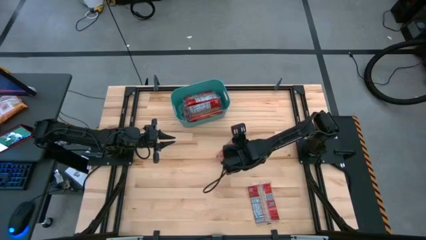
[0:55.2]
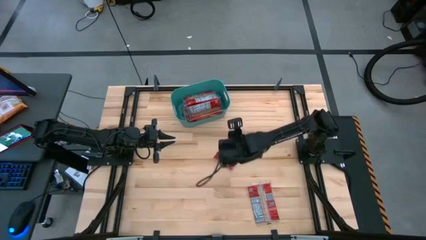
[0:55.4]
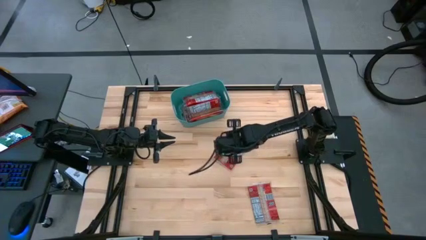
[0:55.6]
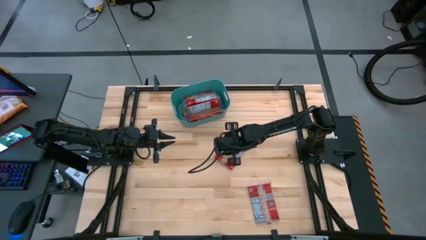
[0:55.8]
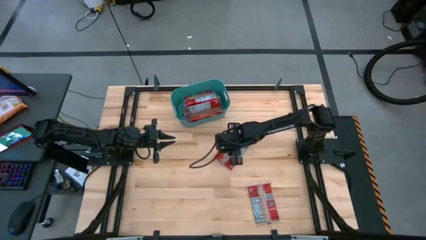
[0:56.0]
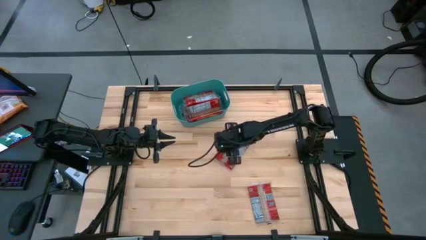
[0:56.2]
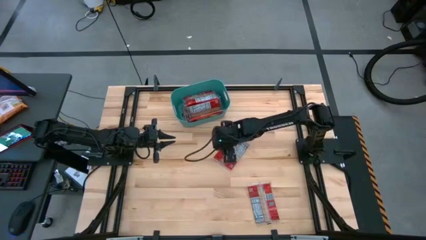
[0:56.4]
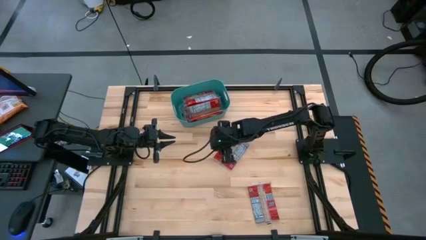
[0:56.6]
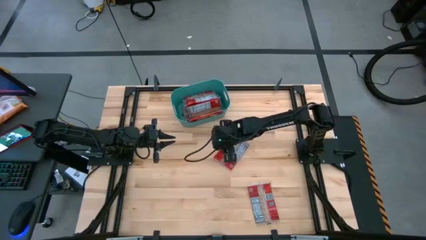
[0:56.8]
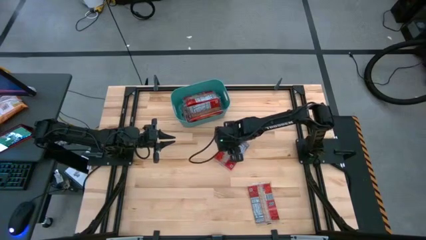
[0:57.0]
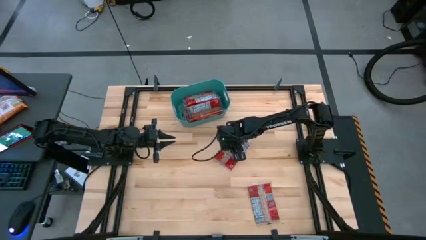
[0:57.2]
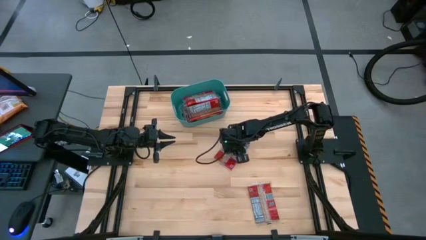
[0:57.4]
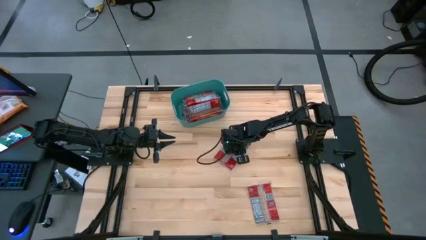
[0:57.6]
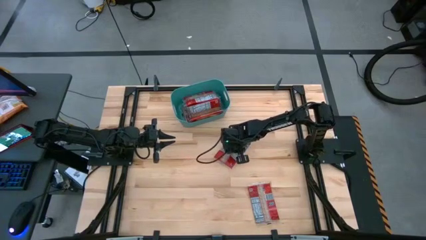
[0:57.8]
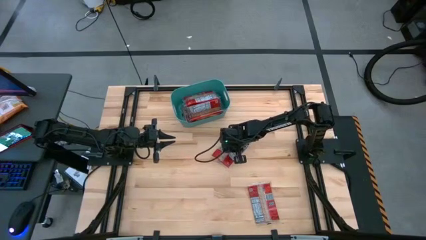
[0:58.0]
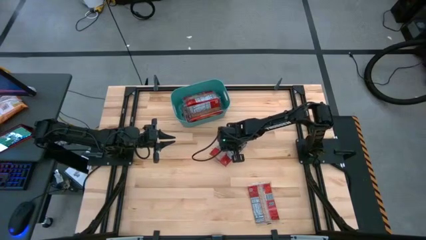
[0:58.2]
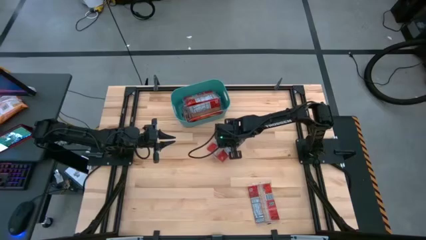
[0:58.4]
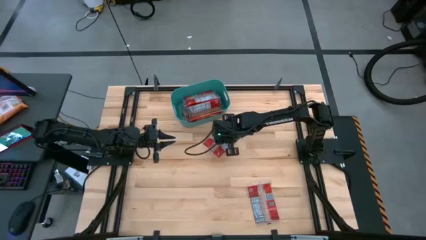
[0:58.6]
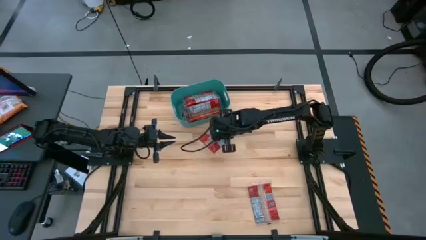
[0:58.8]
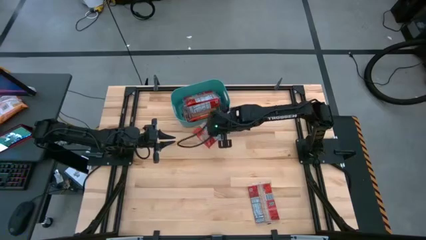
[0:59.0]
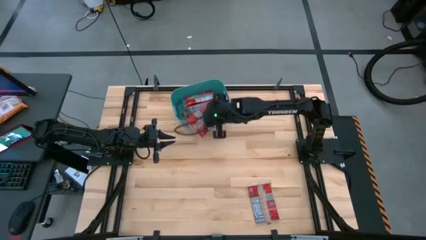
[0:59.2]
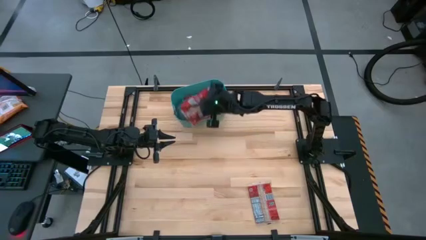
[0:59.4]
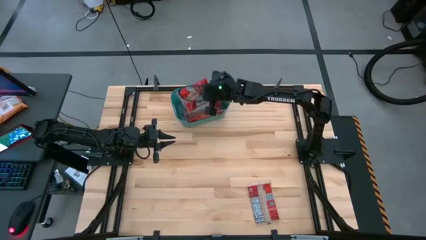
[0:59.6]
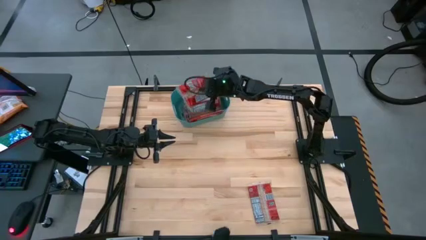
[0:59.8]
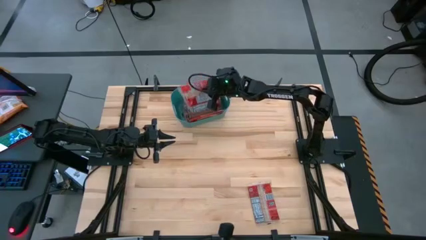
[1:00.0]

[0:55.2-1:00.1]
Task: Sort popcorn bags into baskets
Put the red popcorn bag into the green bin

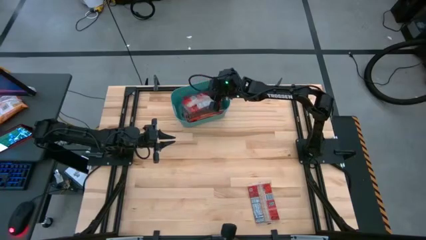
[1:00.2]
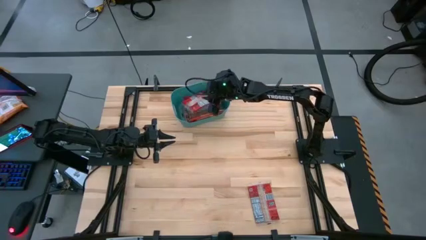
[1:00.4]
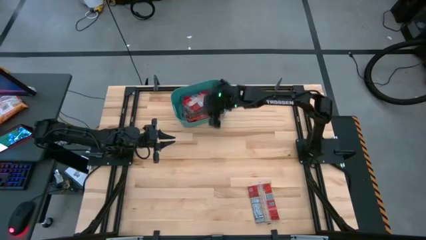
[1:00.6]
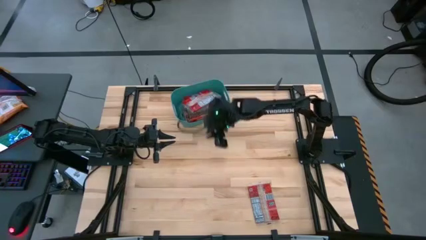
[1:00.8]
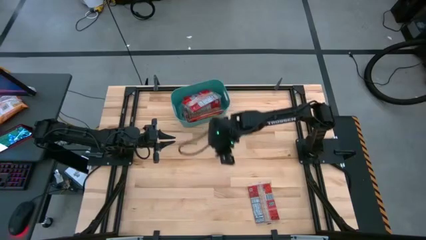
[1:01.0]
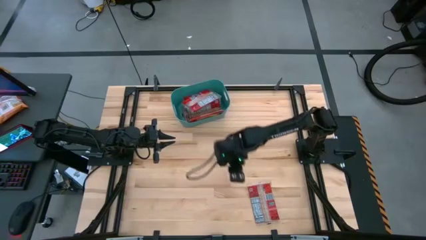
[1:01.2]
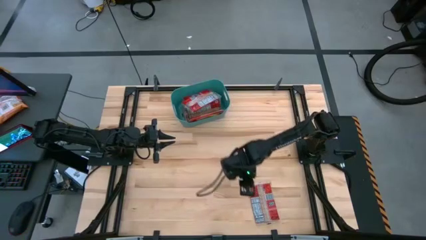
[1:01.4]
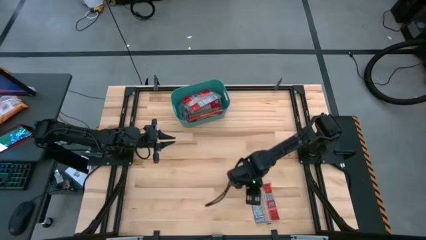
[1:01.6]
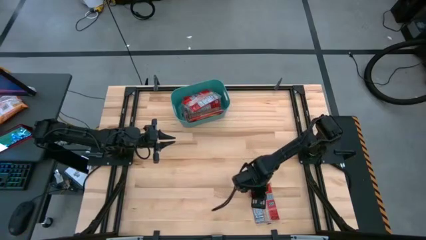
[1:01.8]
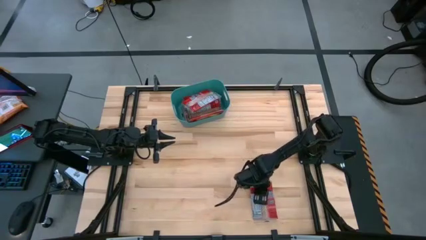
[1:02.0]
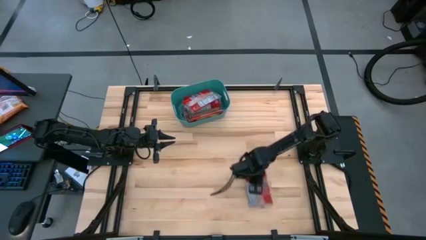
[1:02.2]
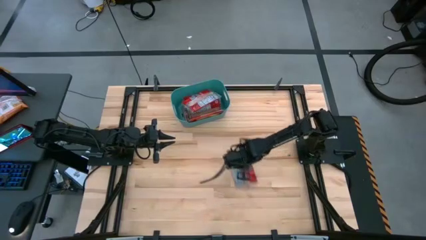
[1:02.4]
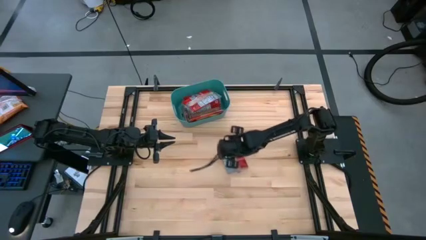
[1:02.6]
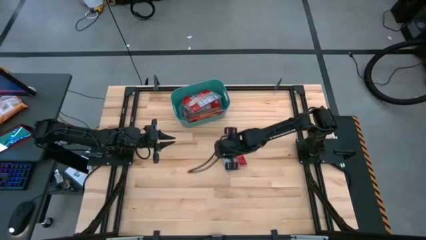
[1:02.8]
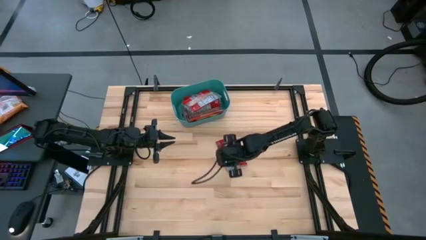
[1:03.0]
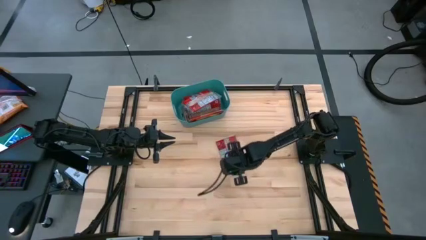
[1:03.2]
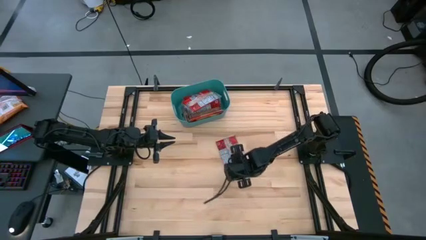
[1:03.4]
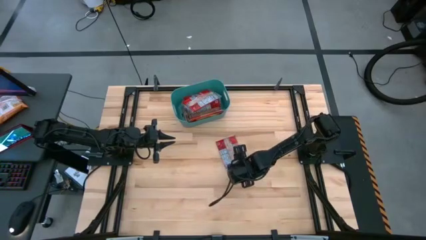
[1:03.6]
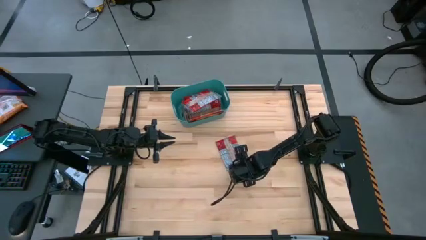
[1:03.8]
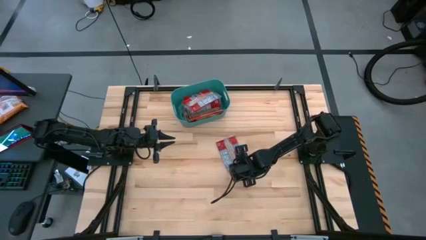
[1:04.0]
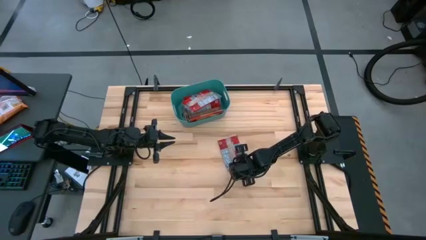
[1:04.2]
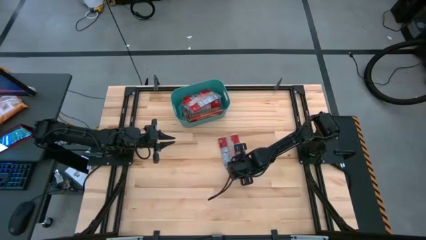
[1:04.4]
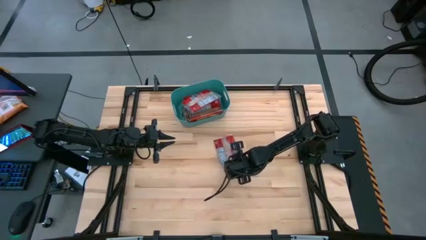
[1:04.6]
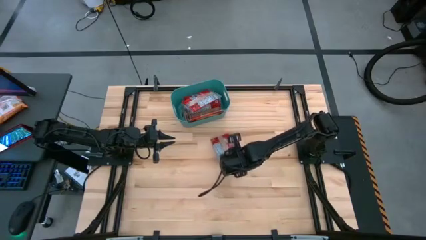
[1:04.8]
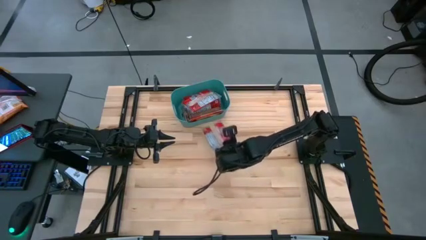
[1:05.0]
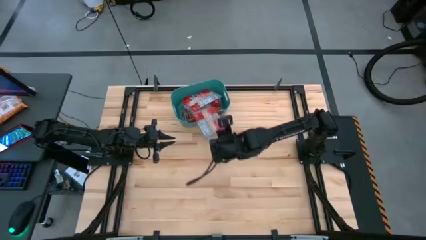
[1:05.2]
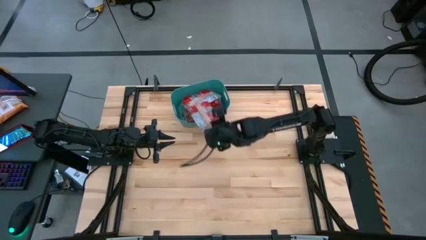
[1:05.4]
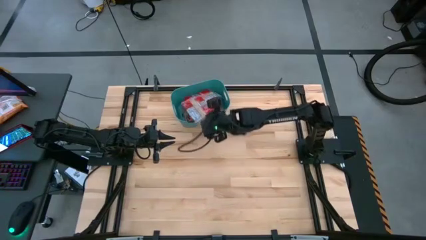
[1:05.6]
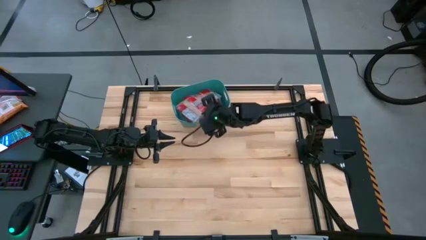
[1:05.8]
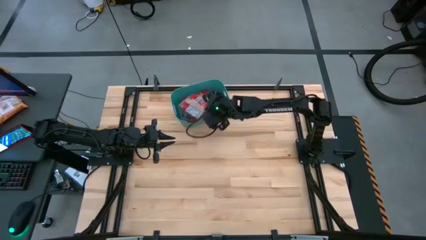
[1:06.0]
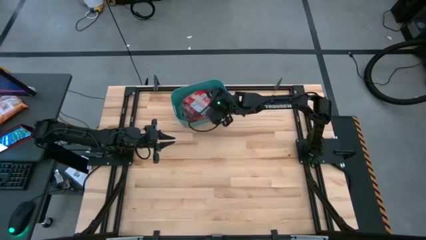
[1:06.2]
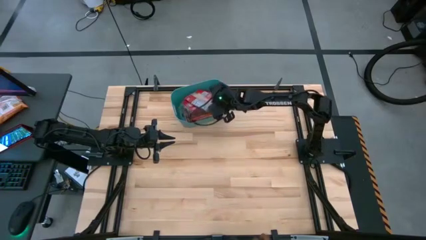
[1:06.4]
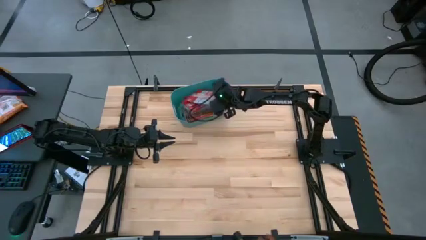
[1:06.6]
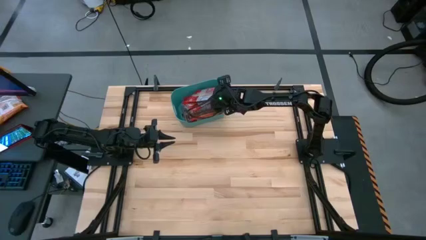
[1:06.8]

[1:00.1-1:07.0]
Put the red popcorn bag into the green bin

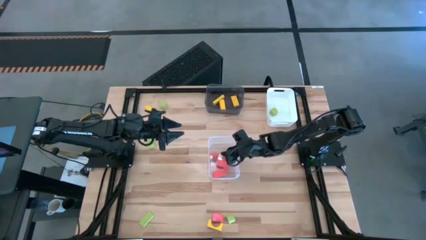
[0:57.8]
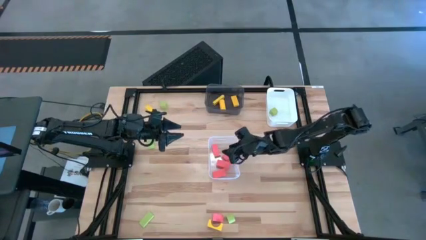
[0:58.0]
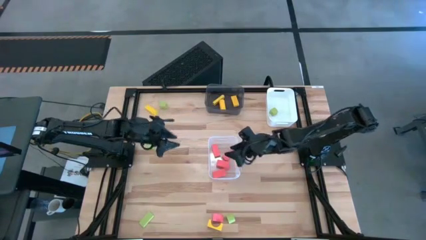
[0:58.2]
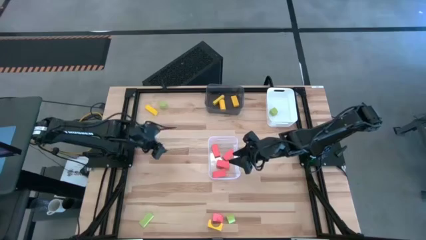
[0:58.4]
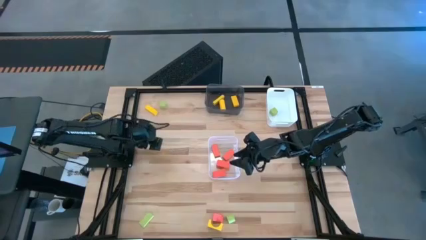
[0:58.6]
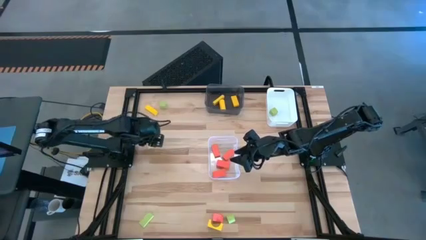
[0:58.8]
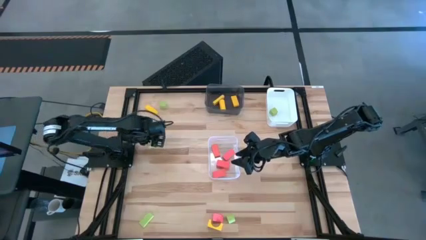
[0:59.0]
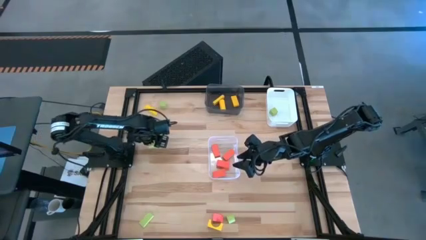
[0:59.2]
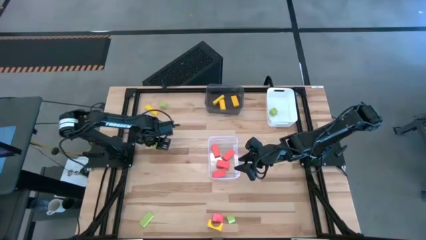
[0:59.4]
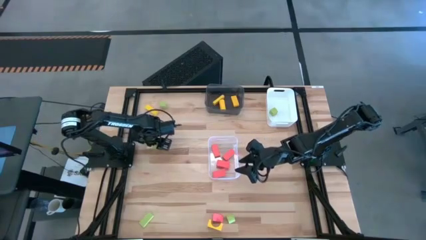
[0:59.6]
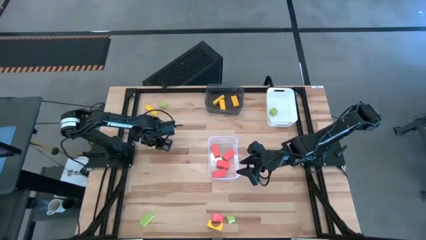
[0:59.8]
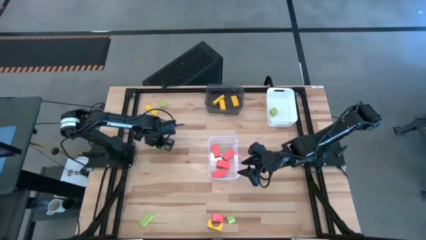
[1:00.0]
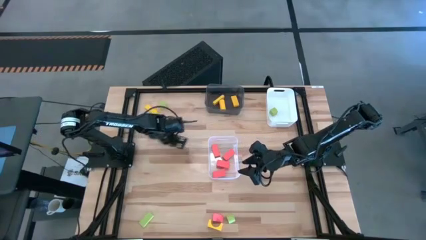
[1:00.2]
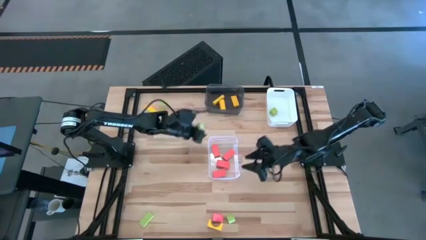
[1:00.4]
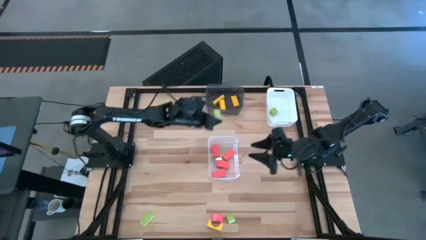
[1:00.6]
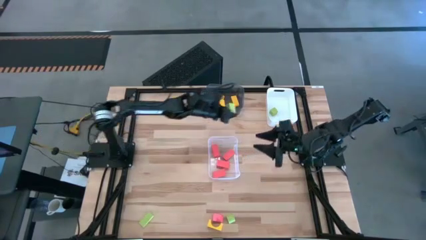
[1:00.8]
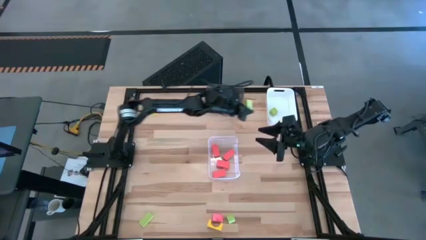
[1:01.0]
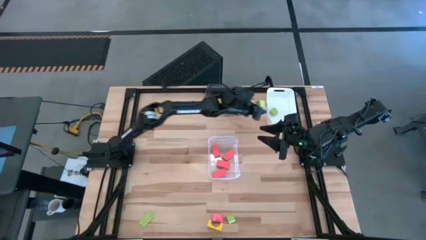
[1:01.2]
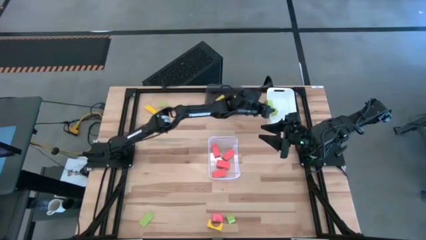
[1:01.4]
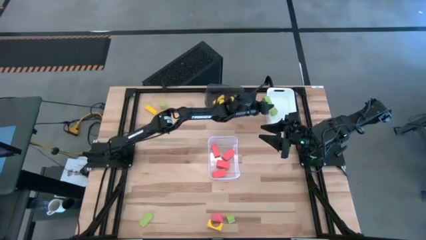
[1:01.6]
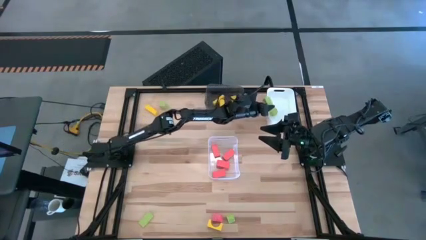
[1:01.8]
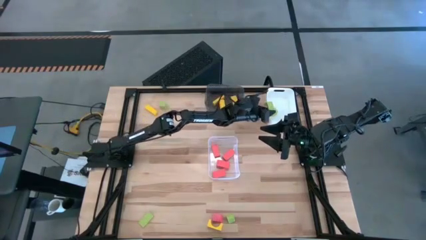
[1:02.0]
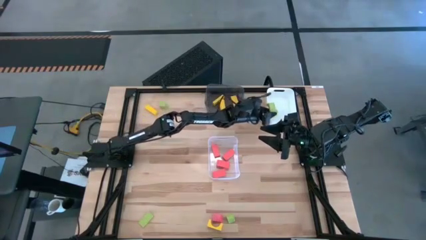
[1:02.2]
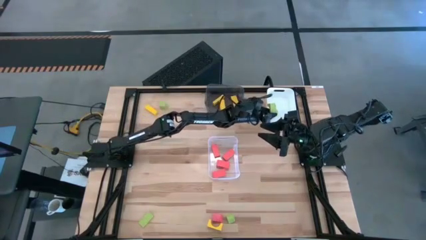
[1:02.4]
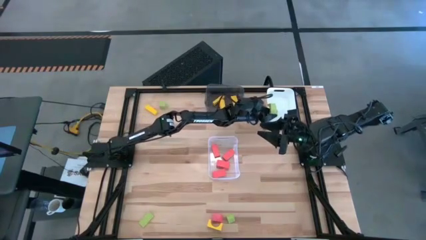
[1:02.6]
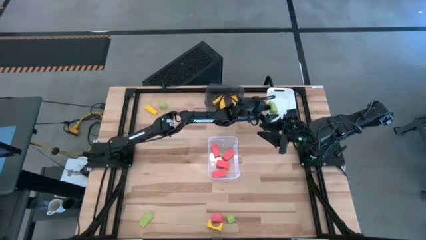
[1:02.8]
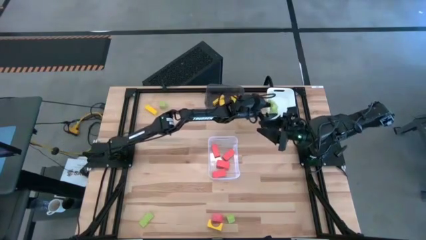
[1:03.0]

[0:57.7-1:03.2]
Task: Sort & place blocks by color
Put the green block into the white bin
